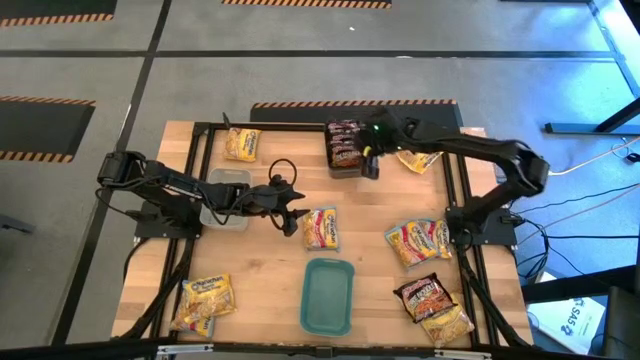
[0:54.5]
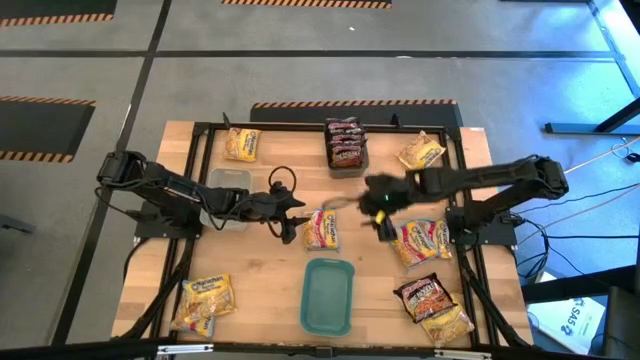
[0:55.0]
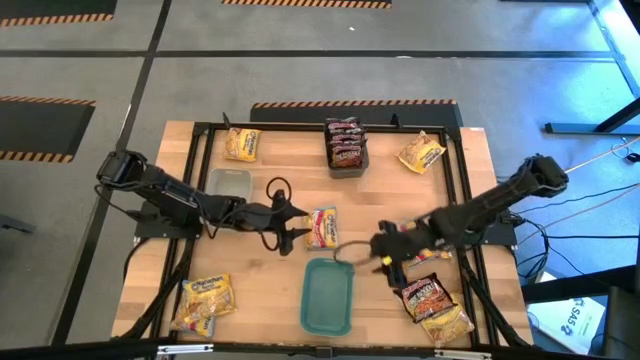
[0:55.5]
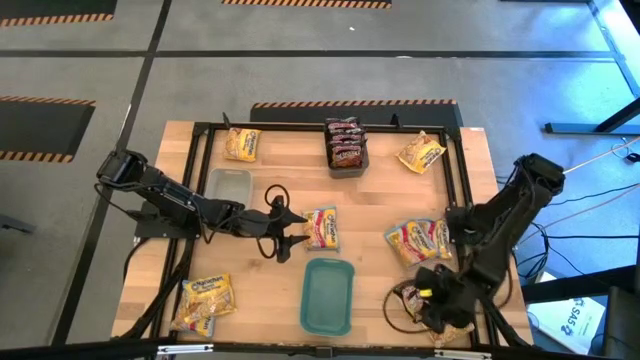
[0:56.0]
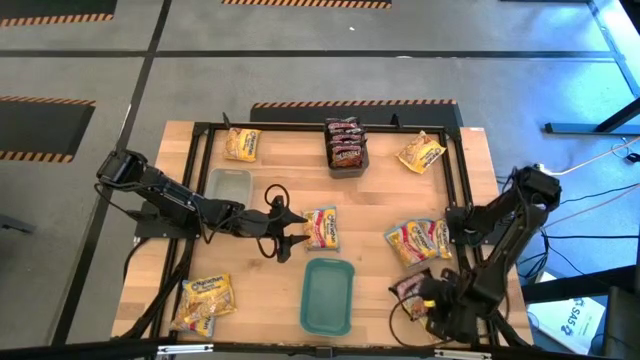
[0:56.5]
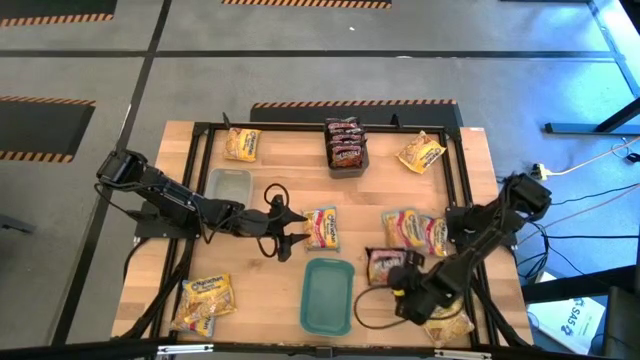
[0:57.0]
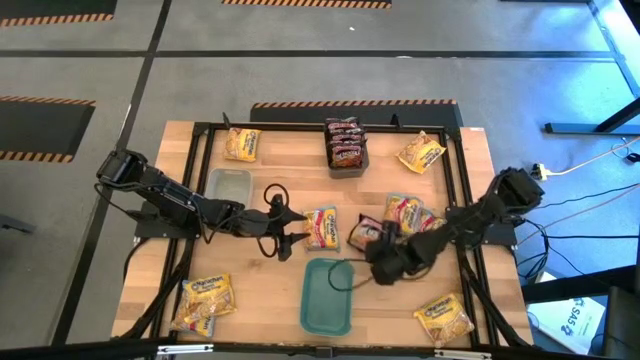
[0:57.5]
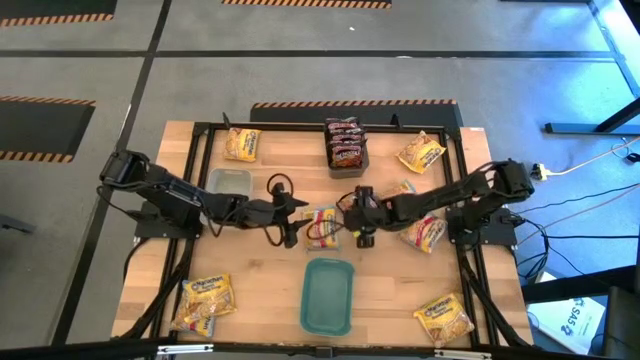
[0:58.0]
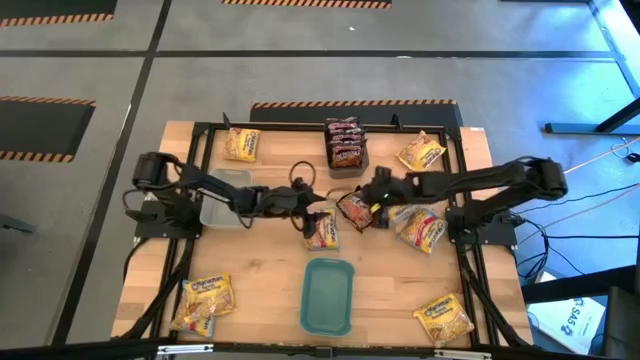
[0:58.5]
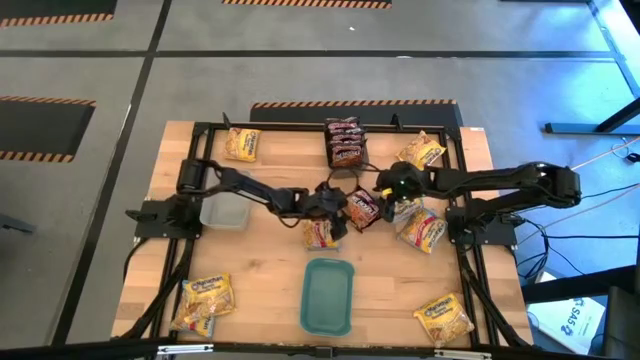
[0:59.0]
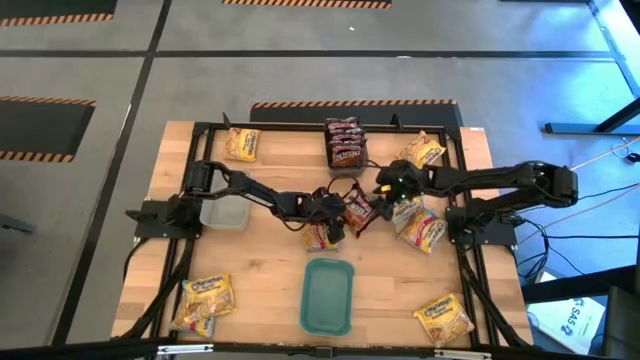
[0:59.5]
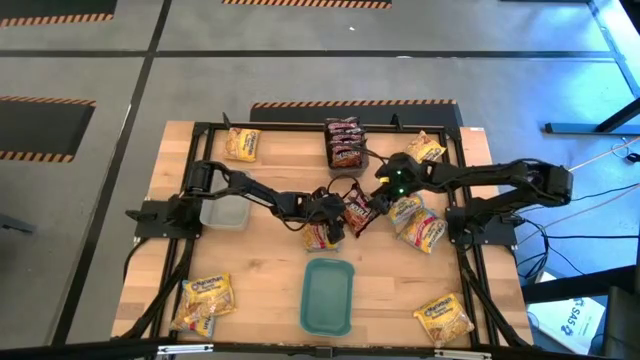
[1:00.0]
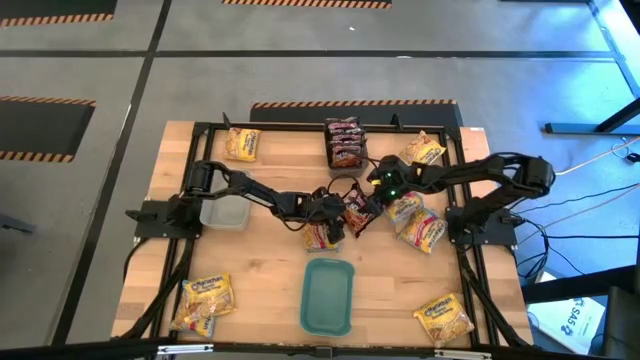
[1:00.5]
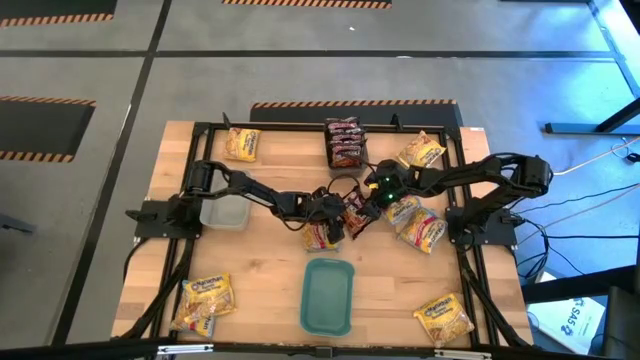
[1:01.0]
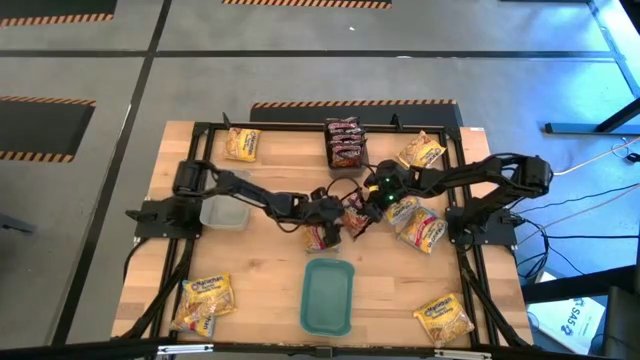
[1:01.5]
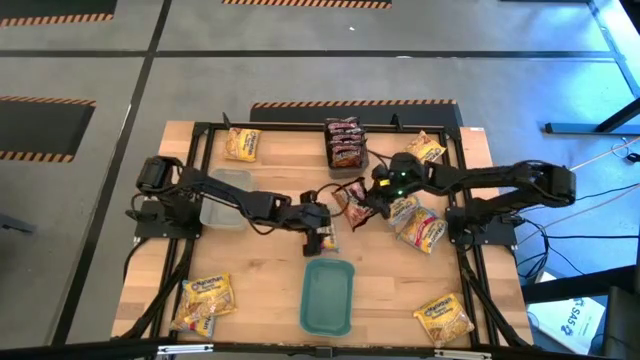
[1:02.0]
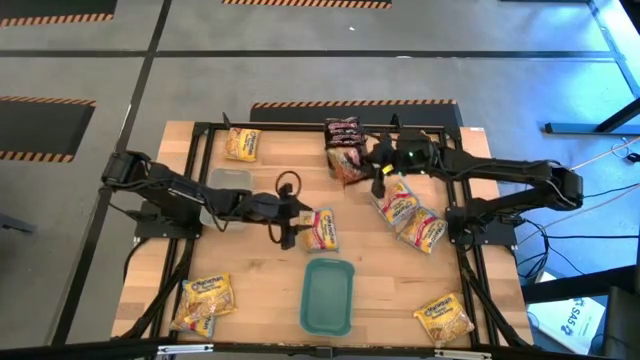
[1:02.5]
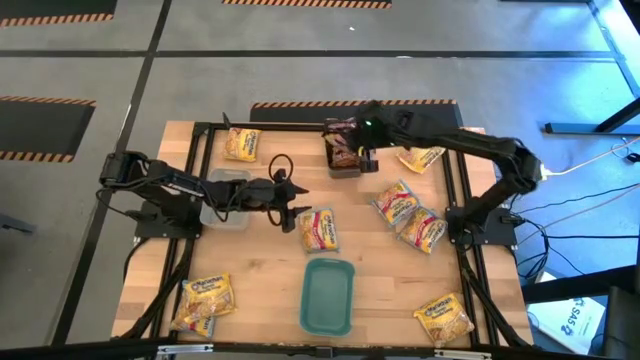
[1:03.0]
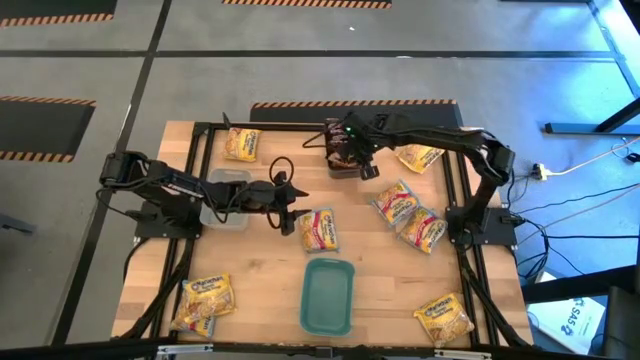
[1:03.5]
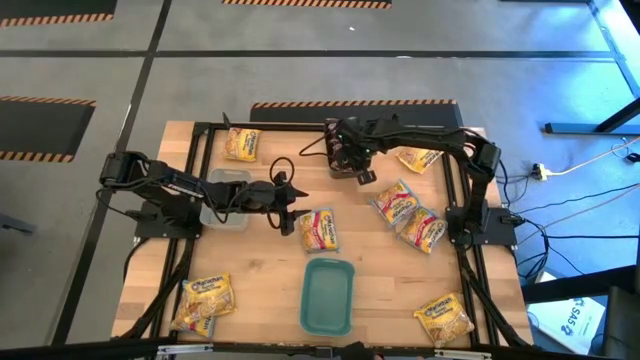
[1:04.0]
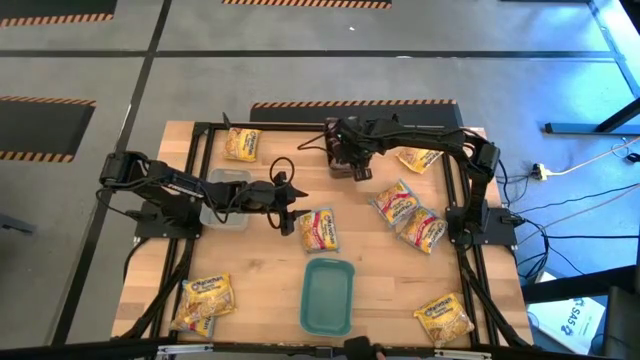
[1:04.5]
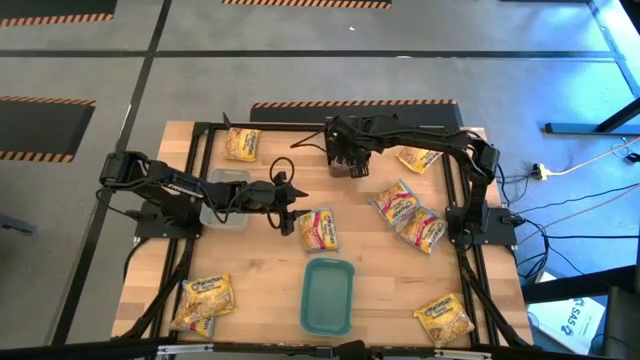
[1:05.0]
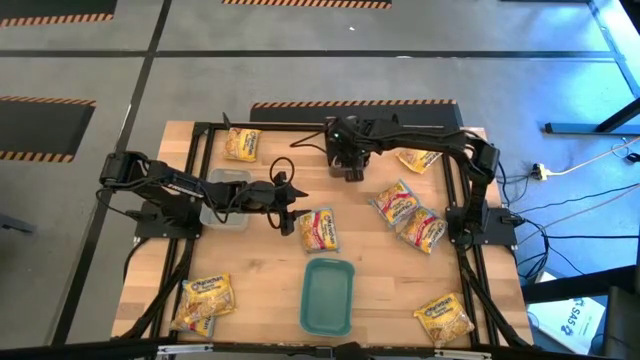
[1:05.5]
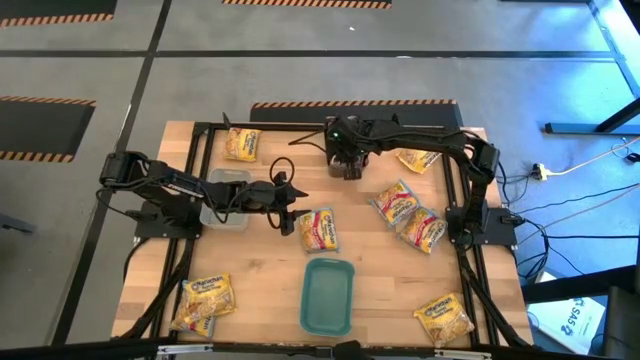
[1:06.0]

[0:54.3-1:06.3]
Task: Sort Maruchan noodles
Put the black noodle pack into the black bin

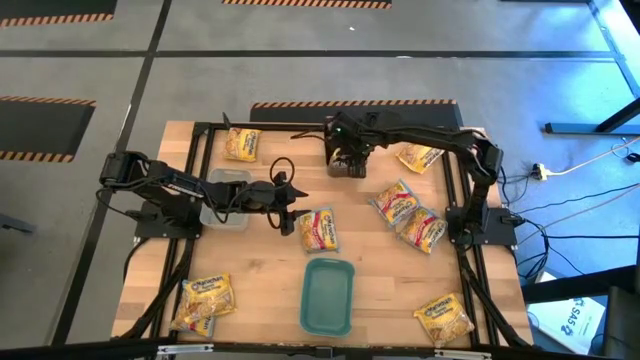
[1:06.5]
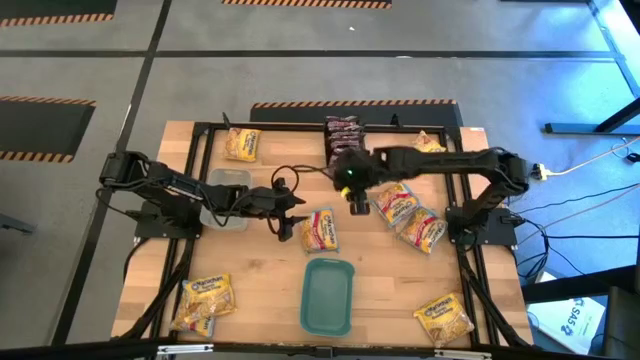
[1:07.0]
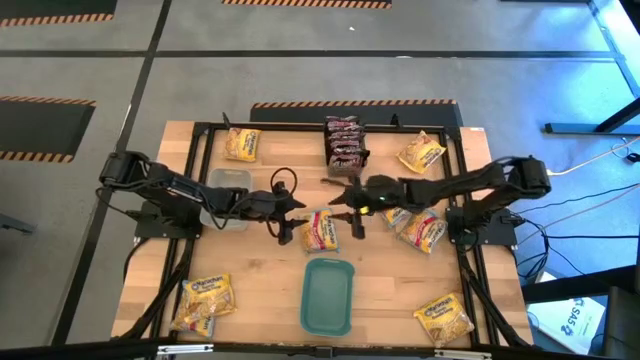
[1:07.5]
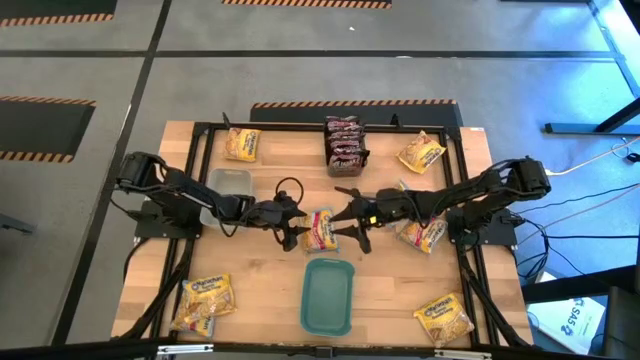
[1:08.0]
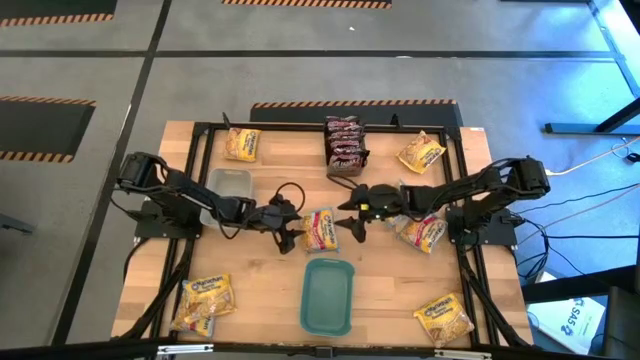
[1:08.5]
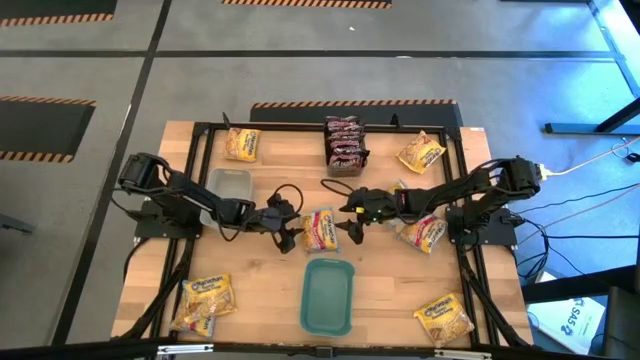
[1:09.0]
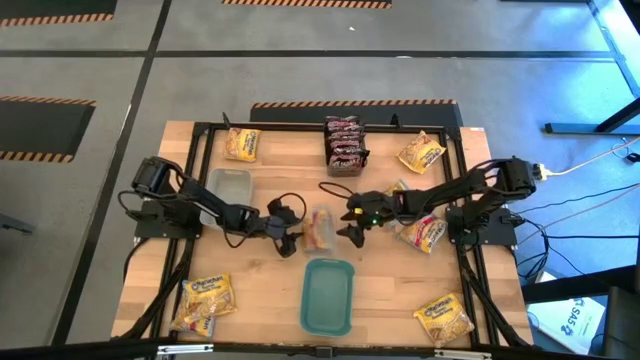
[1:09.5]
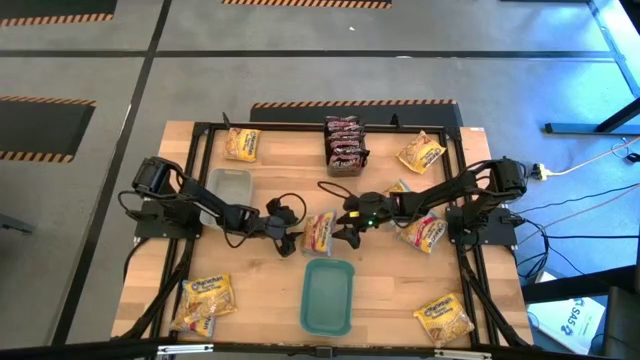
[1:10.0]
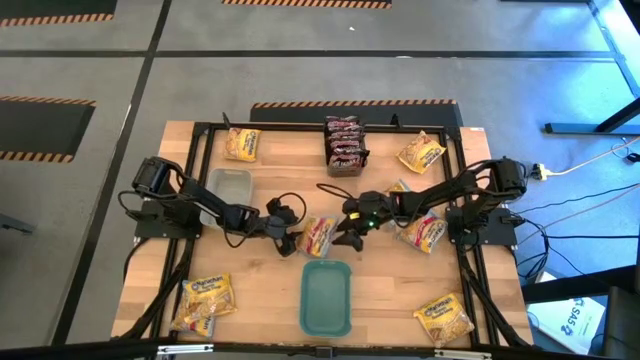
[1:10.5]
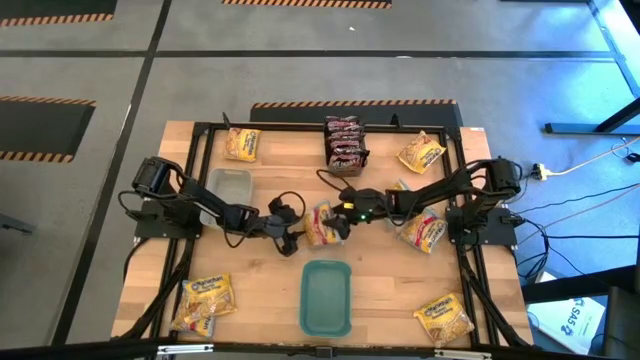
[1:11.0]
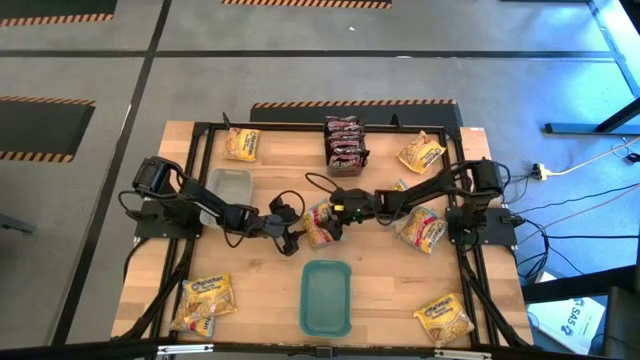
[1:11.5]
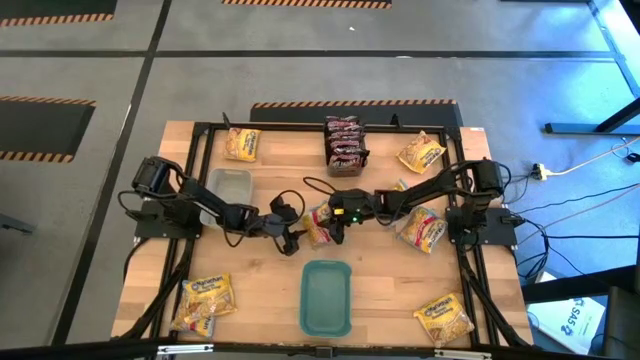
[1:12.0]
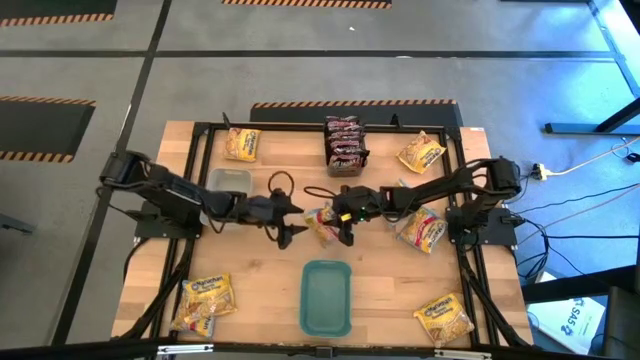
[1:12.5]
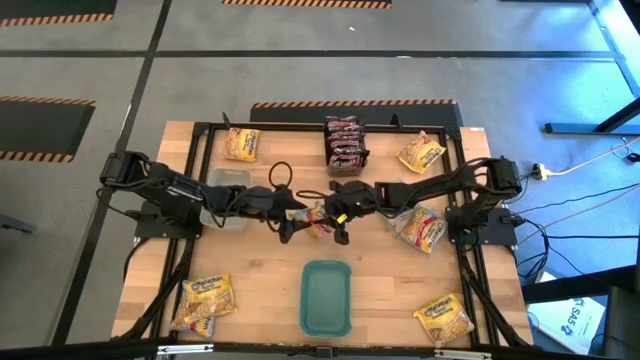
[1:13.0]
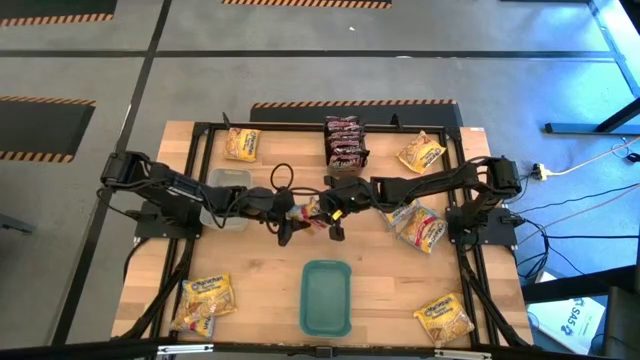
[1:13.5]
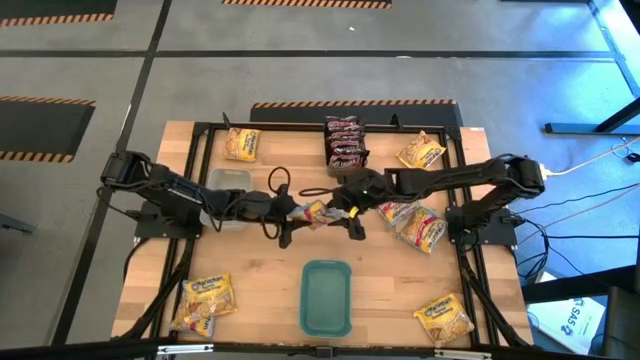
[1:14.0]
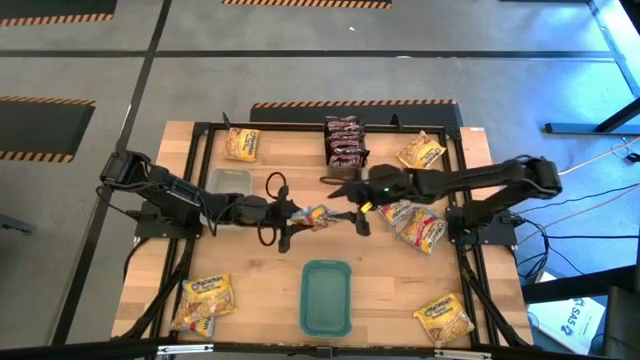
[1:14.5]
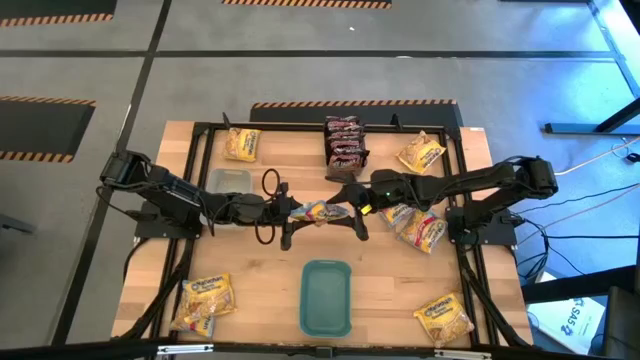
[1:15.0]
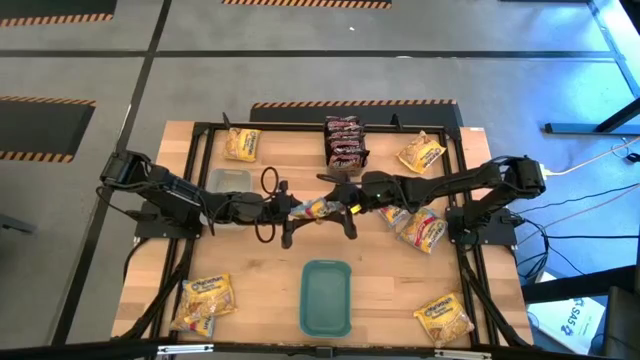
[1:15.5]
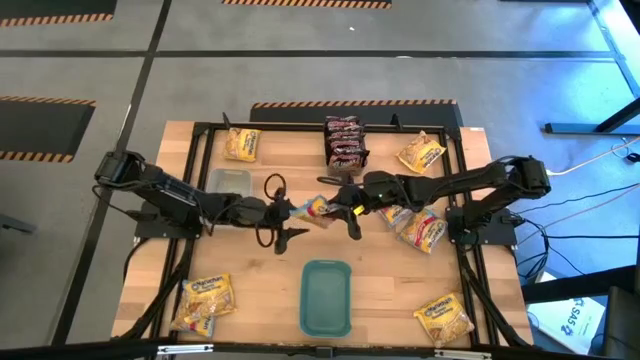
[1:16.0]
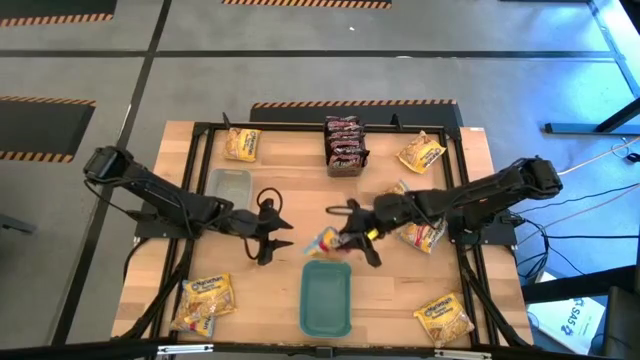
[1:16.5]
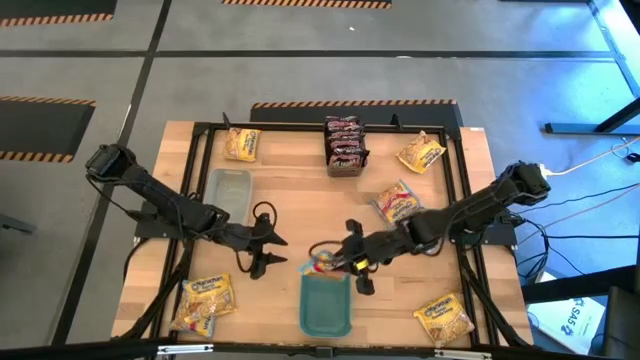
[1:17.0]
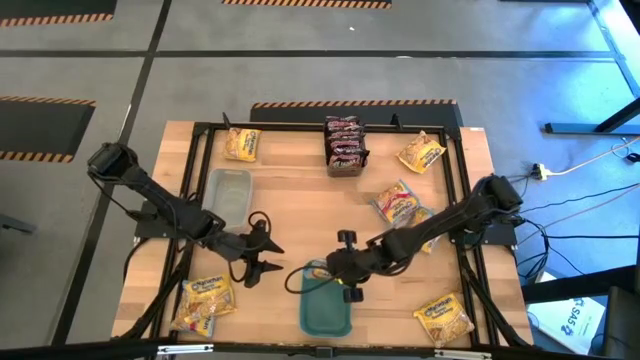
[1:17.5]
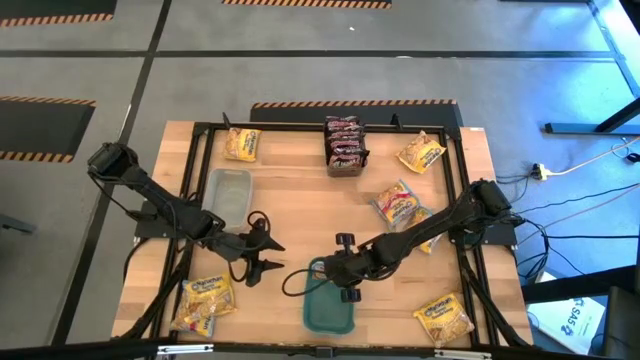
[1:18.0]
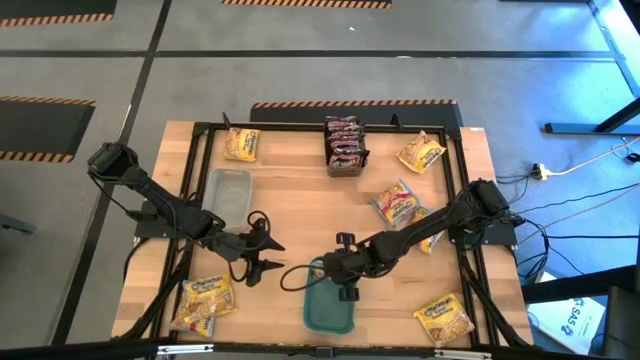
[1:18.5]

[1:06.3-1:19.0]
Put the blue noodle pack into the blue bin
